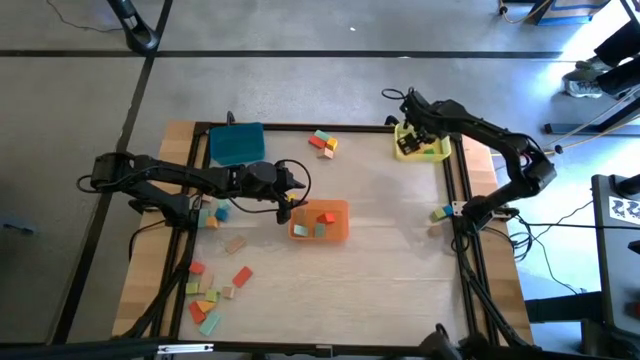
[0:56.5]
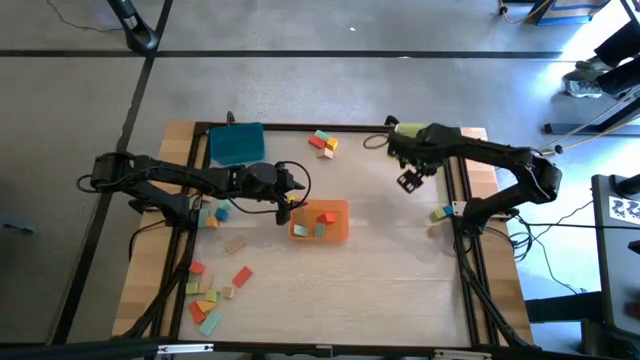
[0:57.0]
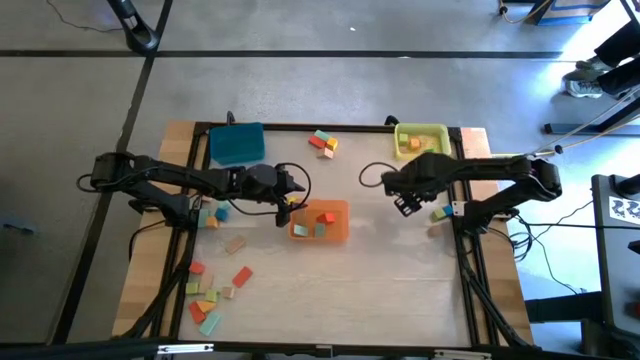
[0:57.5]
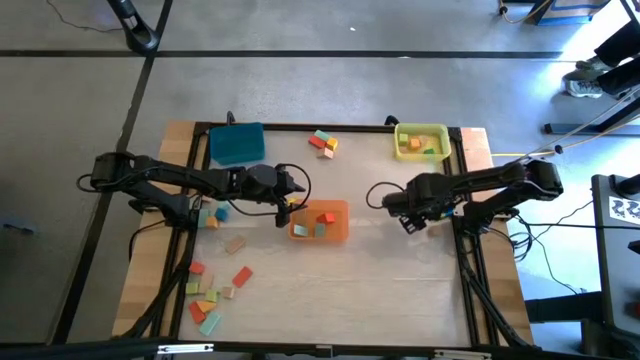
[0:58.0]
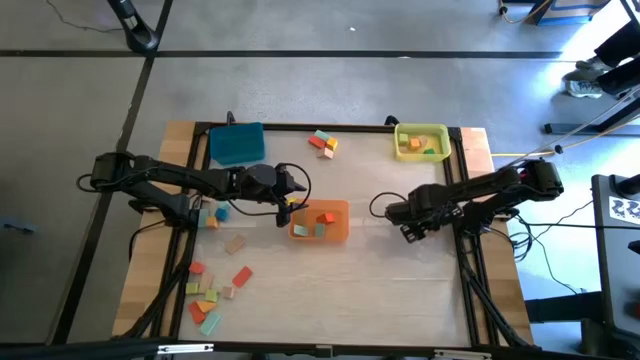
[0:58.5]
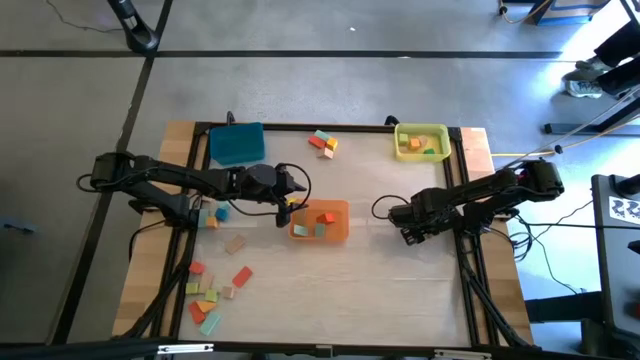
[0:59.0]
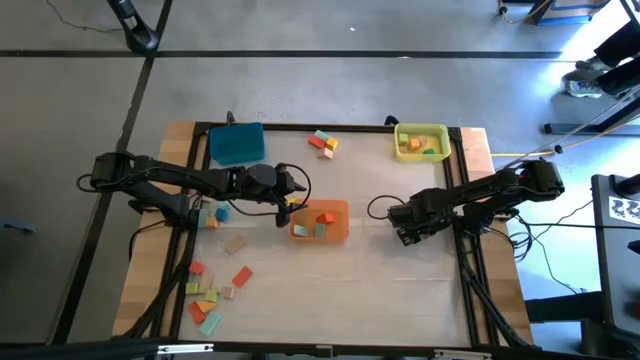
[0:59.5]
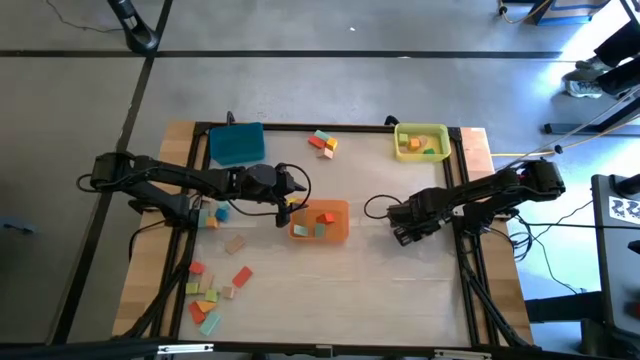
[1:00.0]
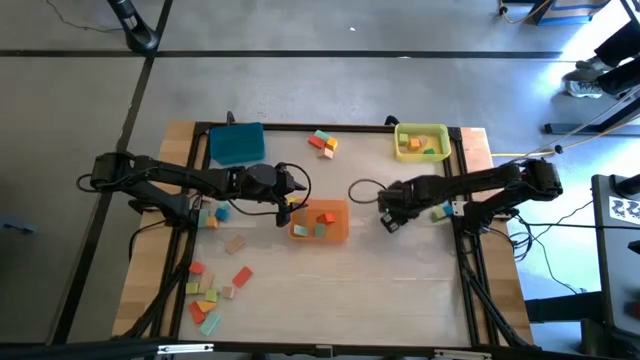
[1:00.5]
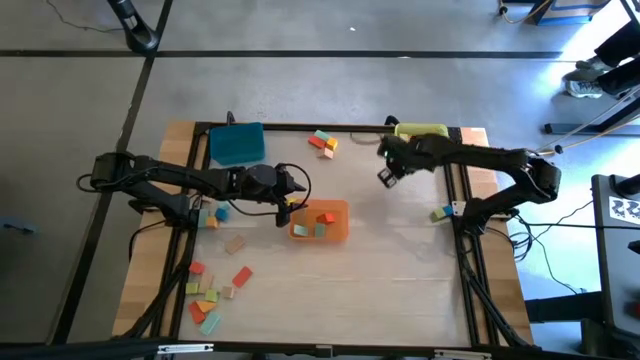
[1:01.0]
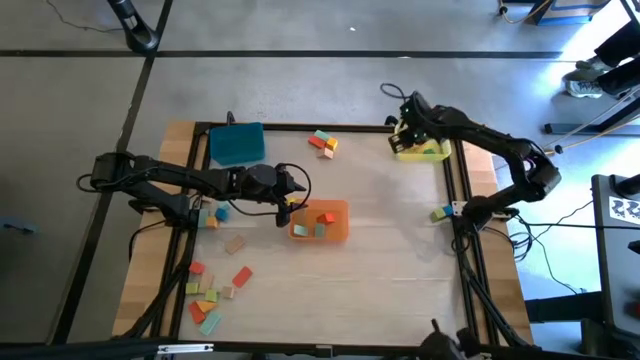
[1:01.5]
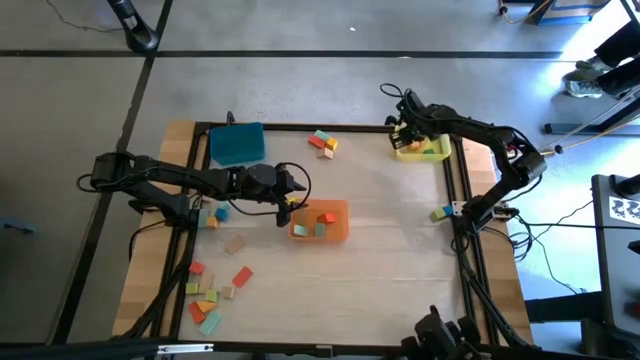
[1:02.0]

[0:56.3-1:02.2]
Task: Sort blocks by size
Put the brown cube block into the yellow bin

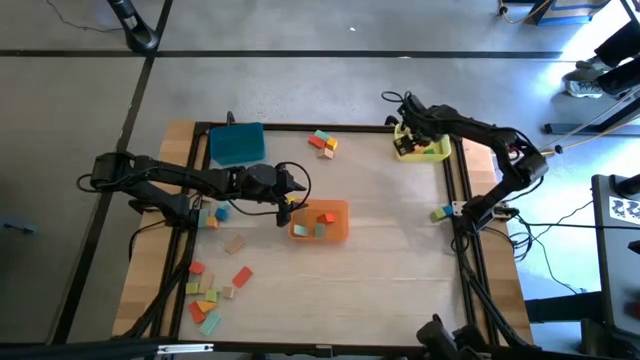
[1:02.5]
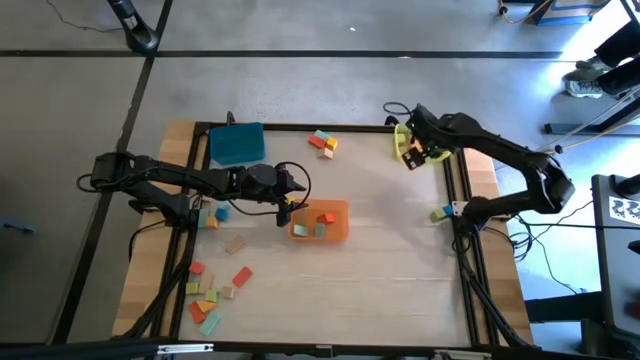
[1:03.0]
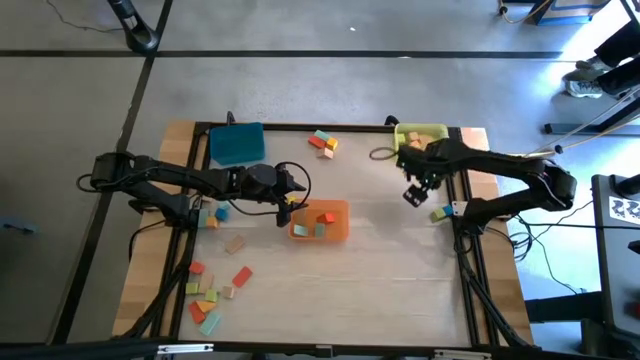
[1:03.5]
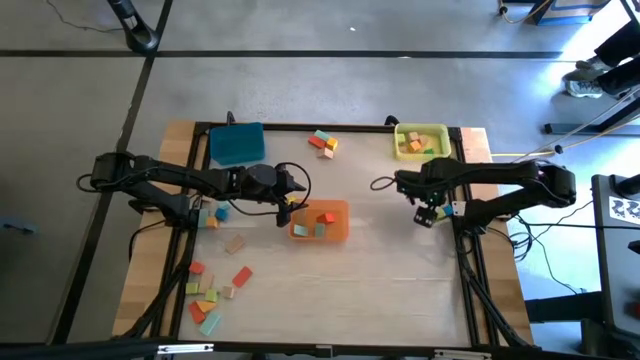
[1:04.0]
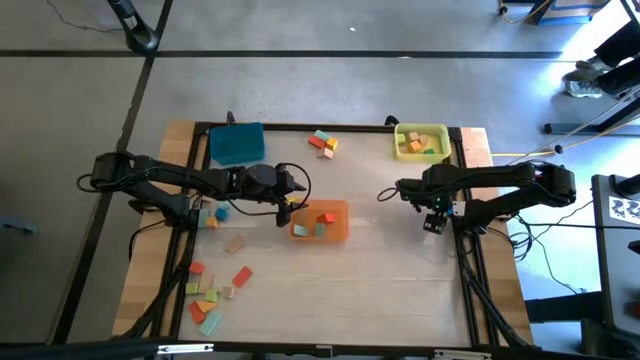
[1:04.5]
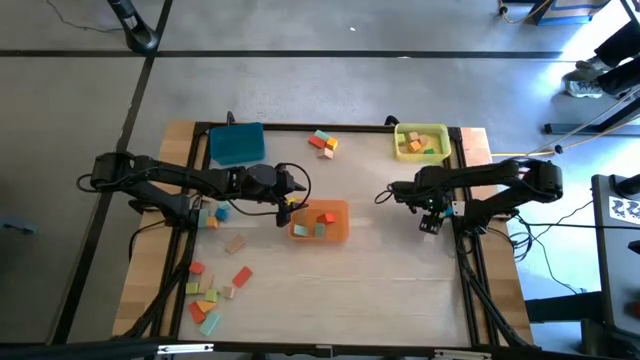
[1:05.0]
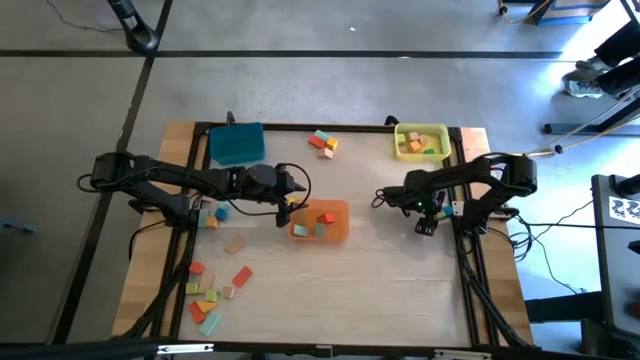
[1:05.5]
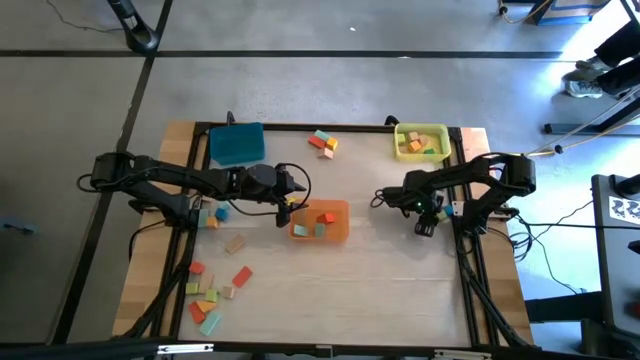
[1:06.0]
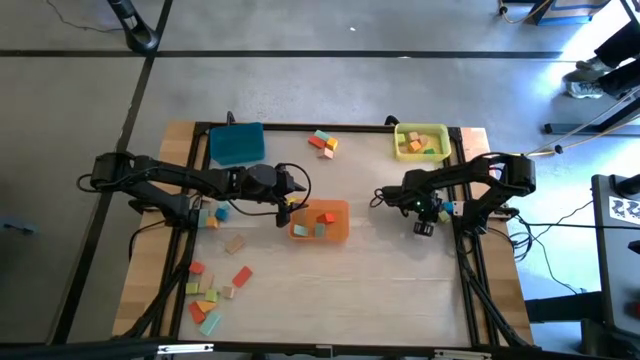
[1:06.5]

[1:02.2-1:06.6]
Put the light green cube block into the yellow bin

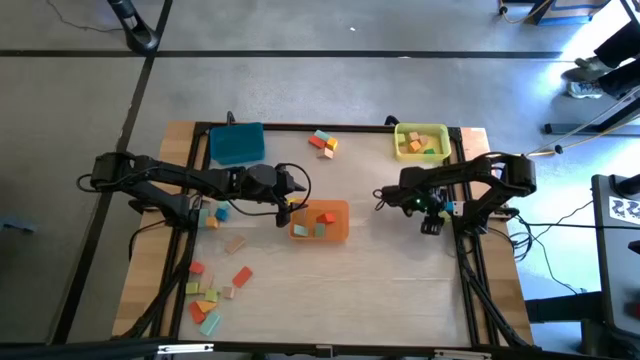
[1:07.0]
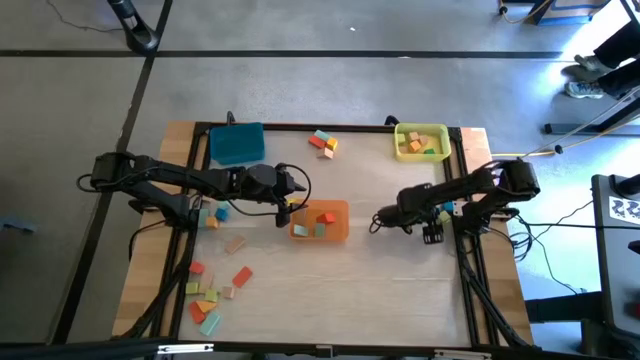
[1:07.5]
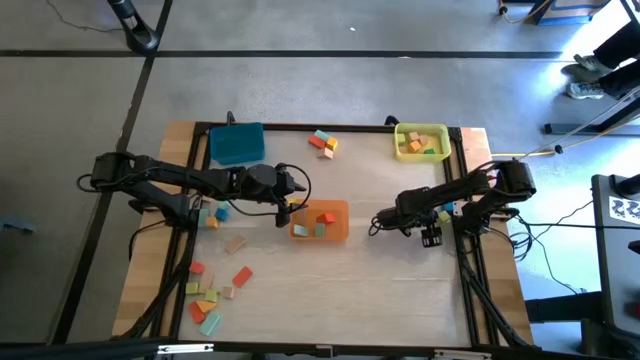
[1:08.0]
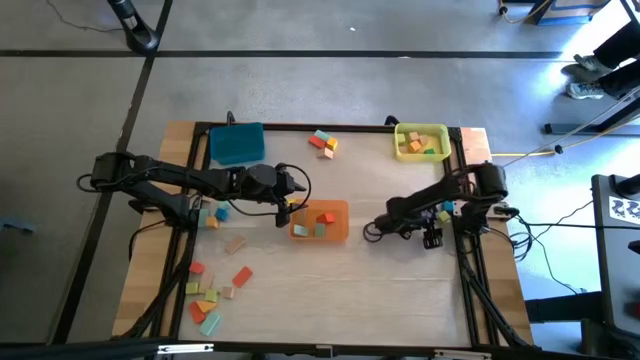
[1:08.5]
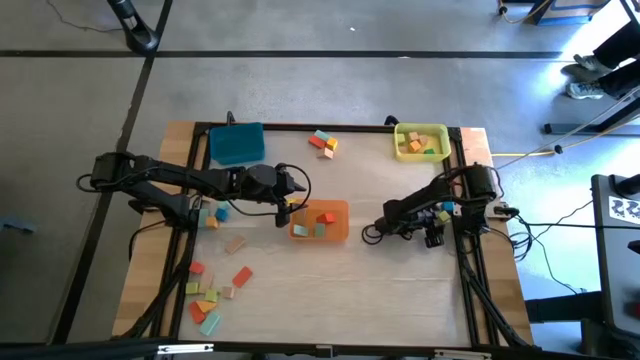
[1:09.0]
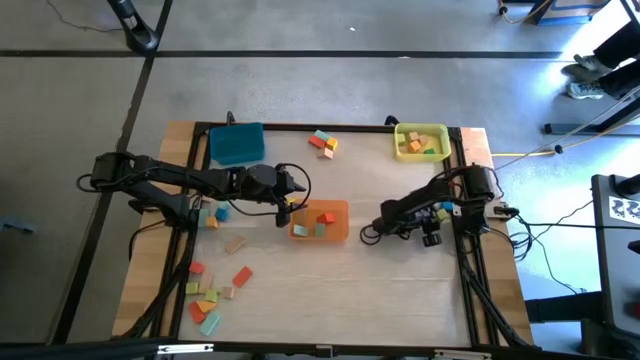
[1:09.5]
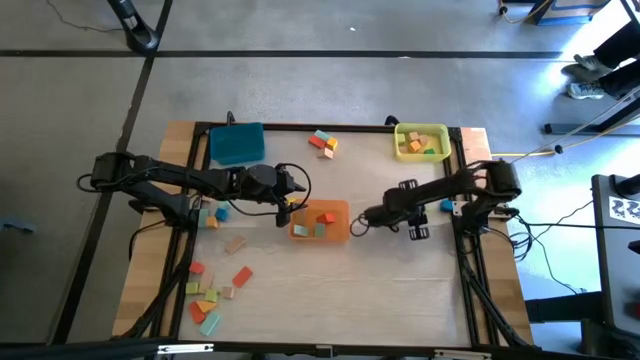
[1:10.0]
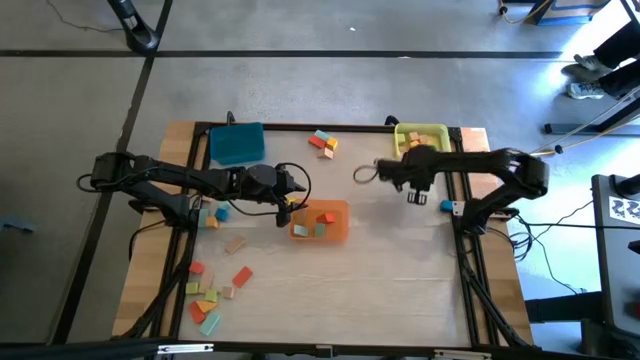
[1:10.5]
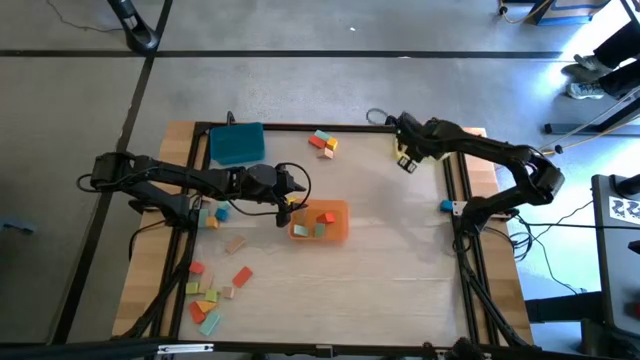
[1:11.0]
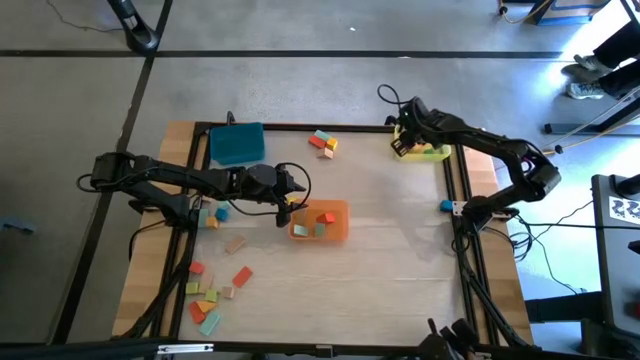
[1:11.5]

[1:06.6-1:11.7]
Put the light green cube block into the yellow bin

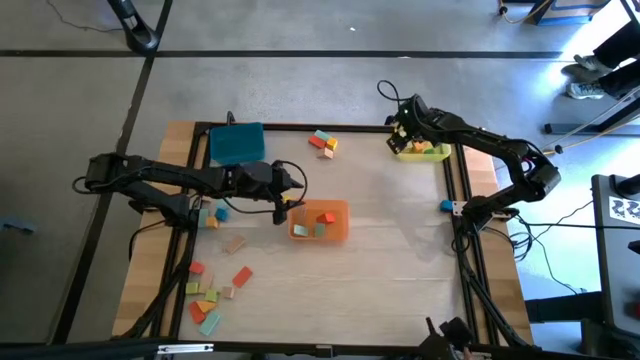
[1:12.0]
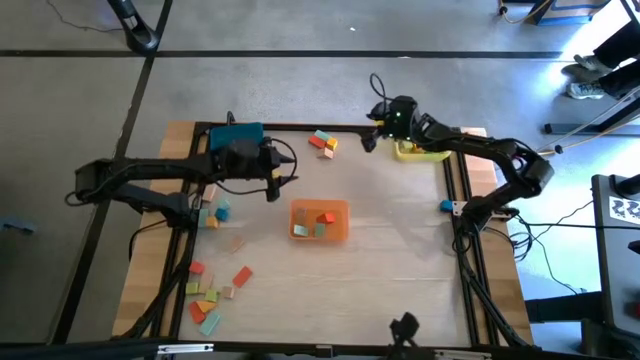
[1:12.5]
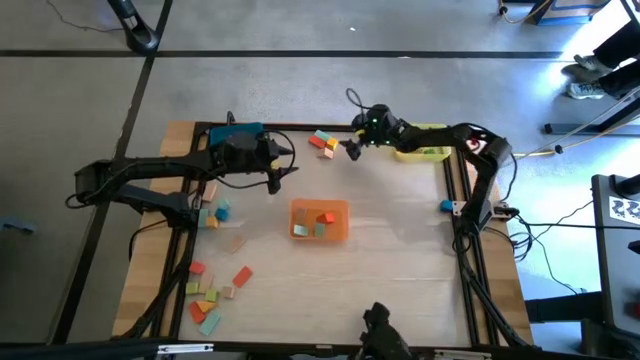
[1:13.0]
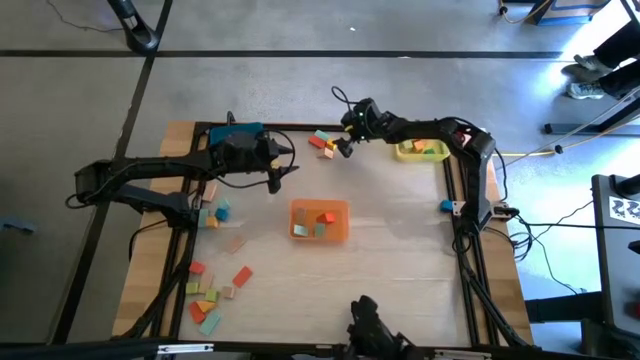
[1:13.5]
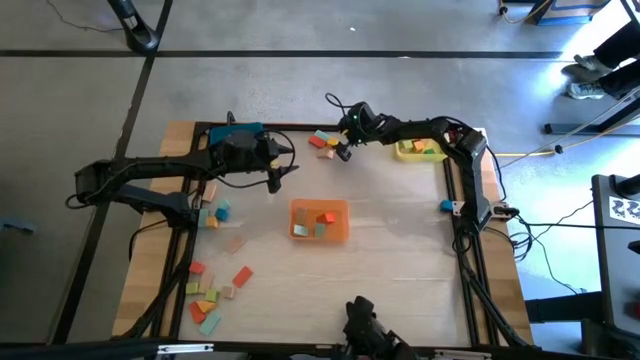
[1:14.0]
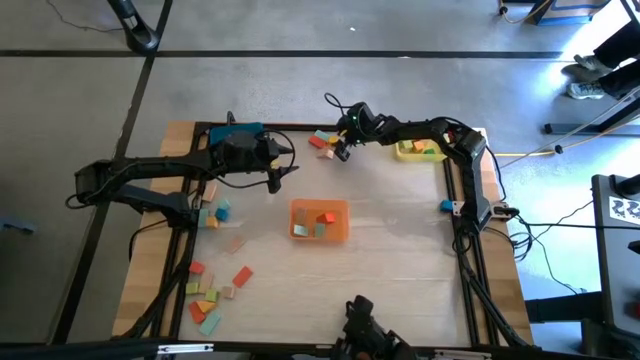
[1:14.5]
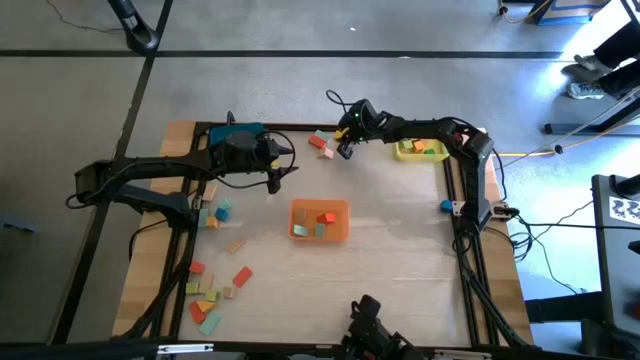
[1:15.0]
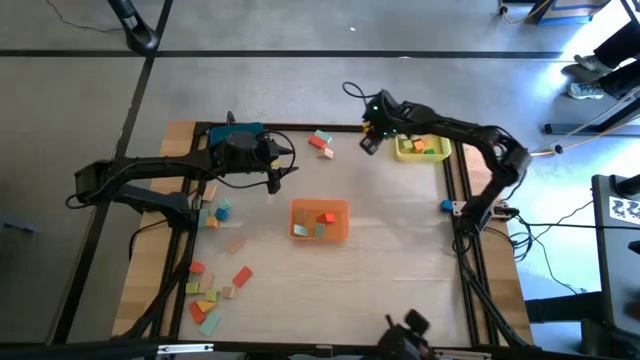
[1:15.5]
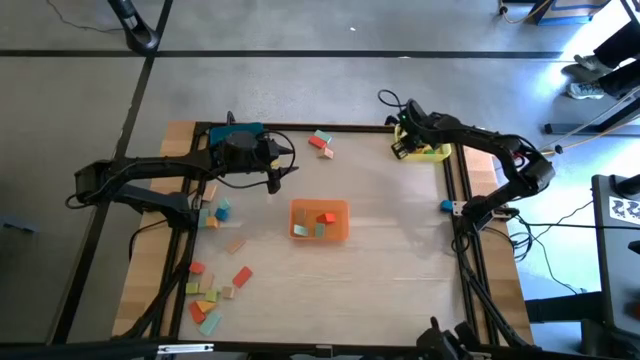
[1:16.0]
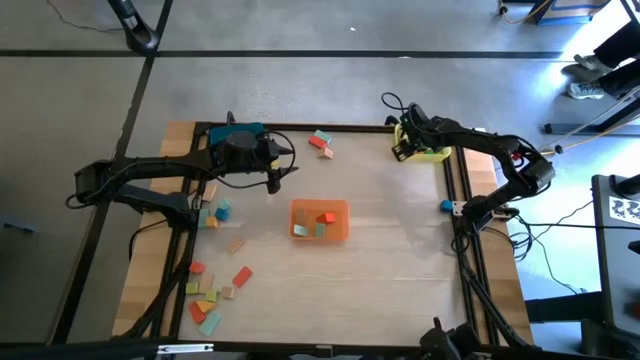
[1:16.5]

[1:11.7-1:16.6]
Put the yellow cube block into the yellow bin
